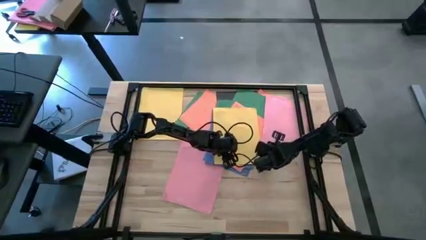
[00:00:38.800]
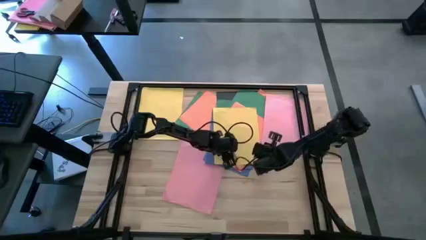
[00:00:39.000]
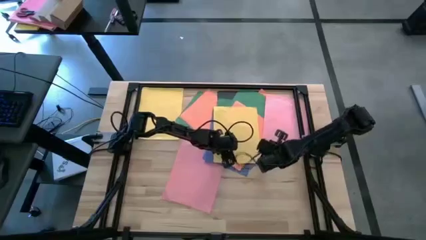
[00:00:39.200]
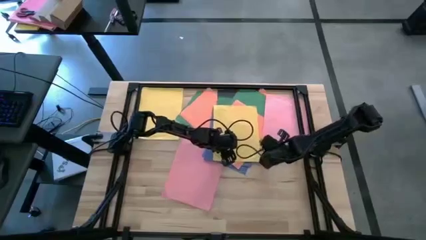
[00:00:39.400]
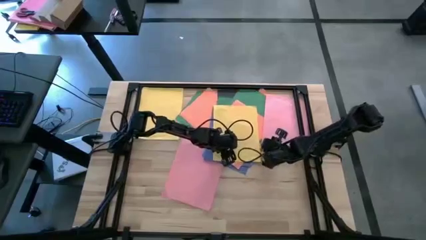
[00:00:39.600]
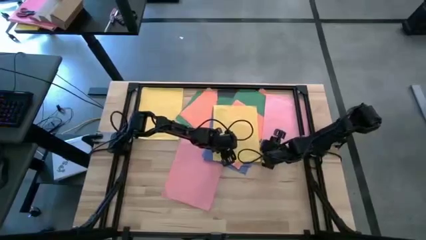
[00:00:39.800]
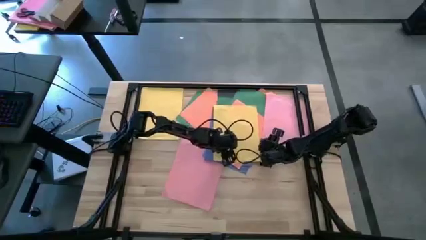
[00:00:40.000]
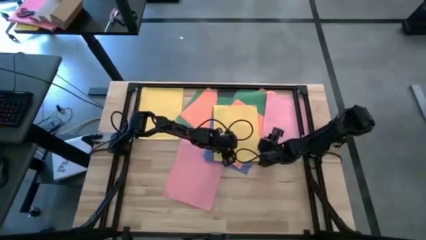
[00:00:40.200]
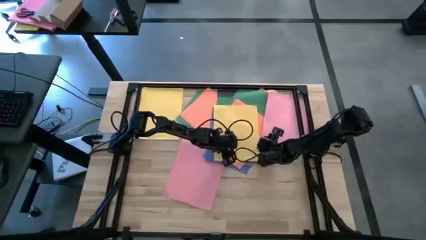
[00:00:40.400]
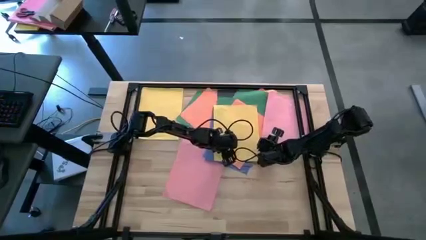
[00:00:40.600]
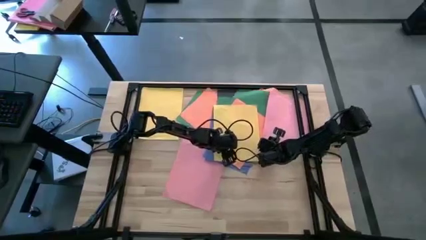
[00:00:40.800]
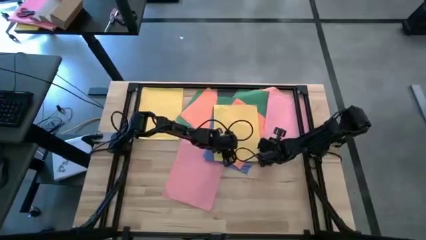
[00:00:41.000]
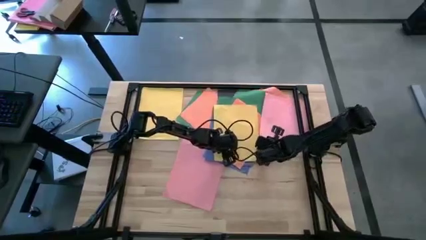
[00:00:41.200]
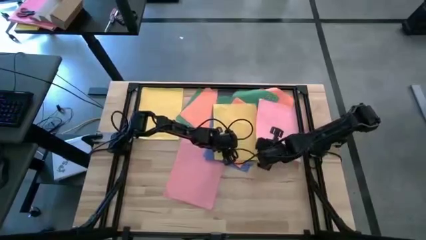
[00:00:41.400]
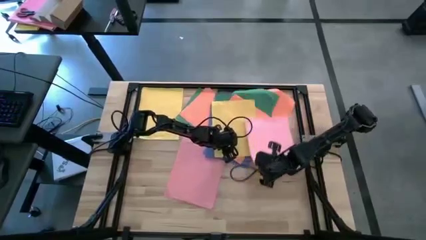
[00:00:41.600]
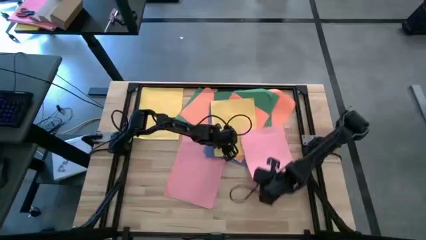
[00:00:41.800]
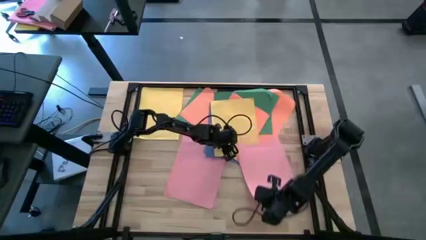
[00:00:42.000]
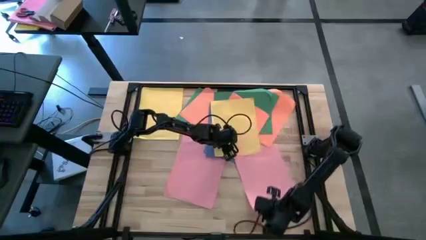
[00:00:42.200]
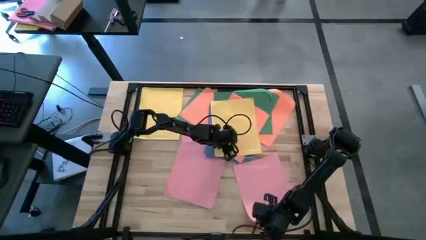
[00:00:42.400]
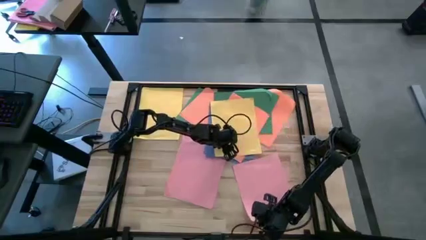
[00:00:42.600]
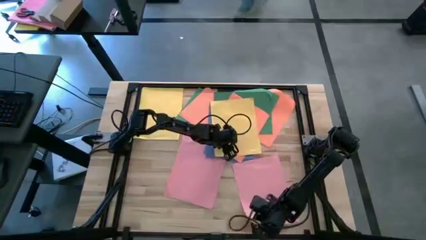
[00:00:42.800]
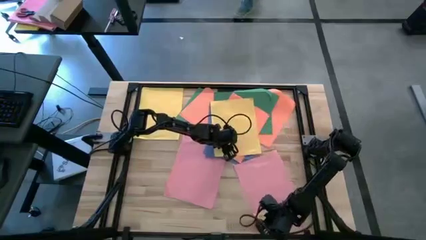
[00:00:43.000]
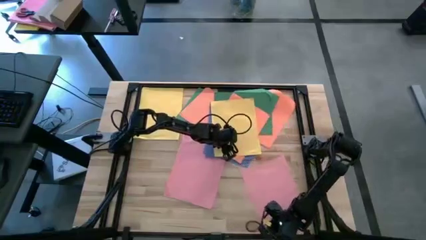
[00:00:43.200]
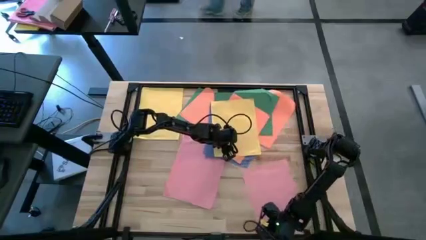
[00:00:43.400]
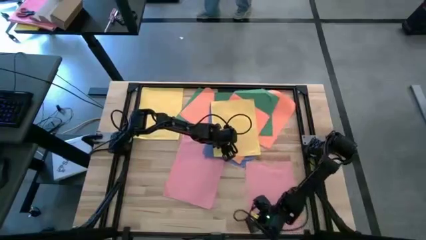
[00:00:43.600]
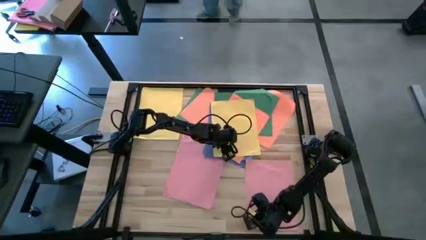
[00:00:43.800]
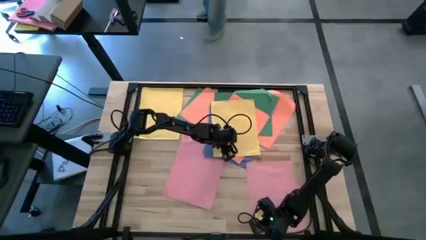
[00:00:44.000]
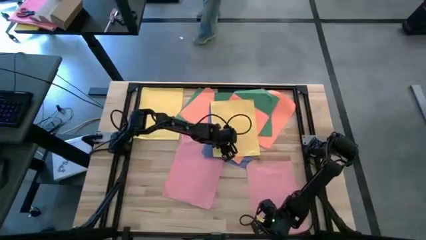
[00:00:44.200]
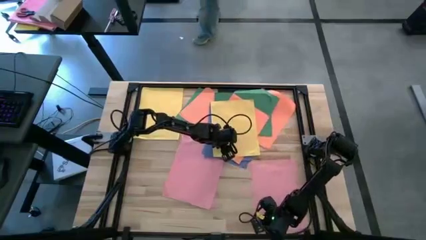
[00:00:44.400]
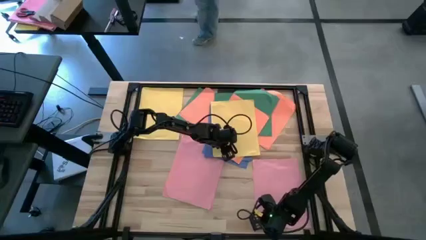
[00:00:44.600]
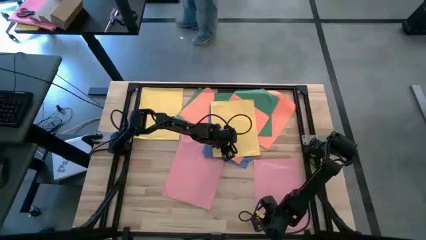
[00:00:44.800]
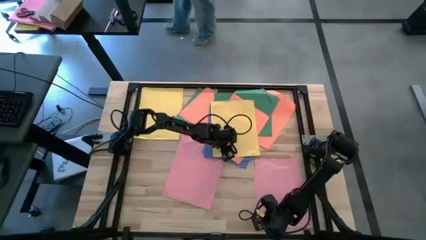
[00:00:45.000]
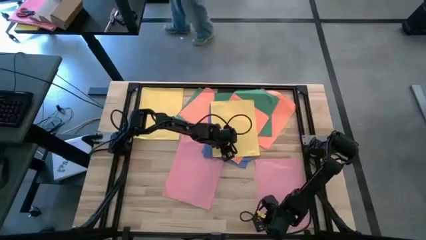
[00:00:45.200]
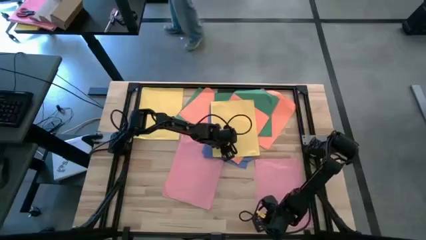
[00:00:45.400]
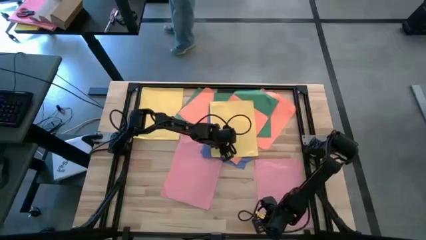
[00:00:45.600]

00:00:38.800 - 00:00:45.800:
Task: Organize paper
Move the pink paper to the bottom right of the table

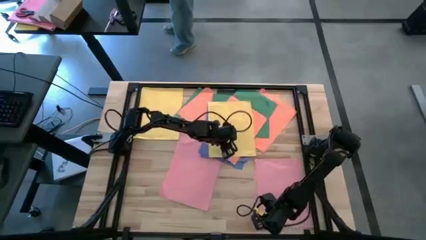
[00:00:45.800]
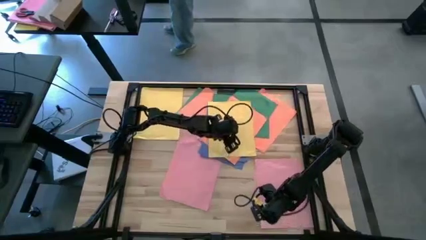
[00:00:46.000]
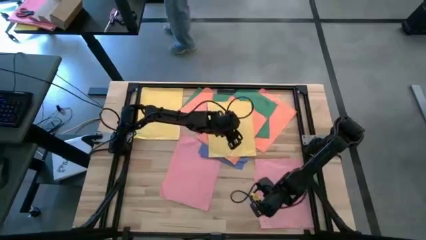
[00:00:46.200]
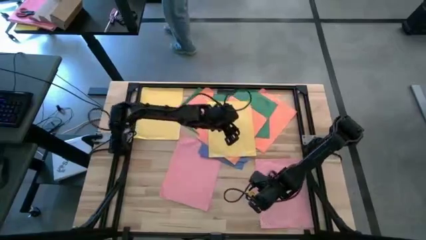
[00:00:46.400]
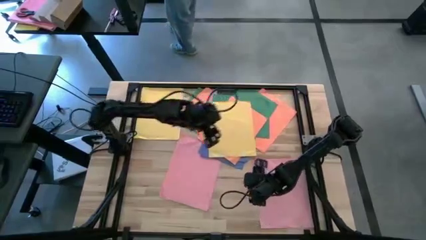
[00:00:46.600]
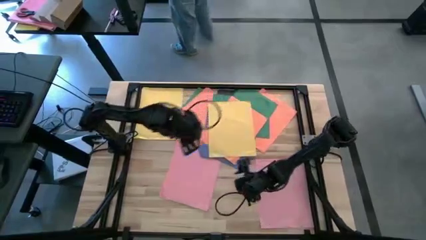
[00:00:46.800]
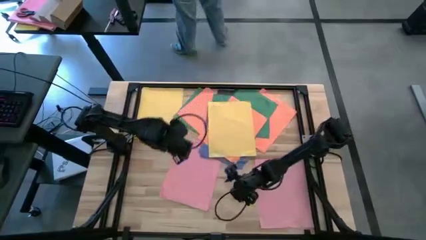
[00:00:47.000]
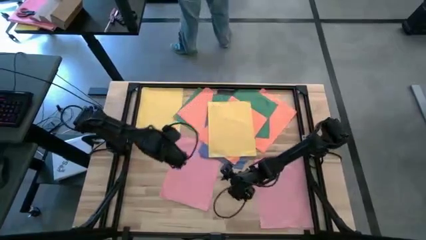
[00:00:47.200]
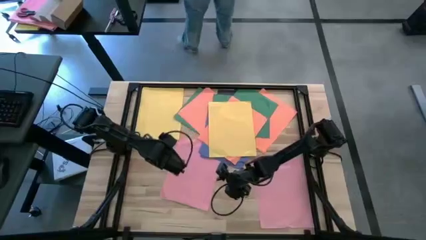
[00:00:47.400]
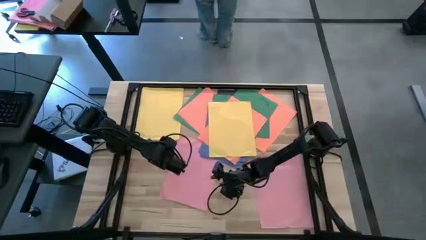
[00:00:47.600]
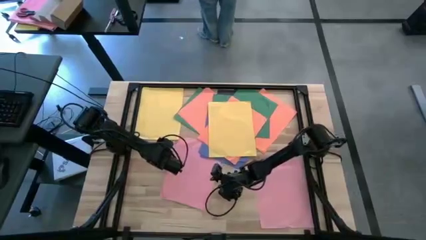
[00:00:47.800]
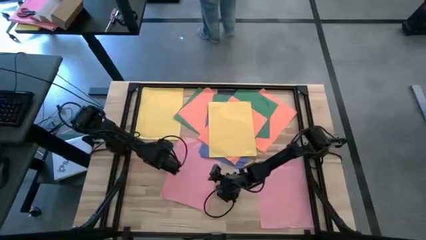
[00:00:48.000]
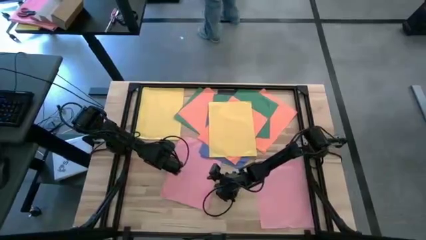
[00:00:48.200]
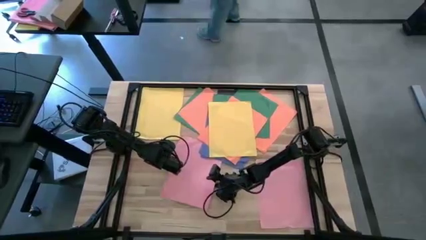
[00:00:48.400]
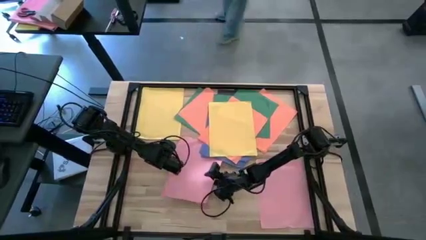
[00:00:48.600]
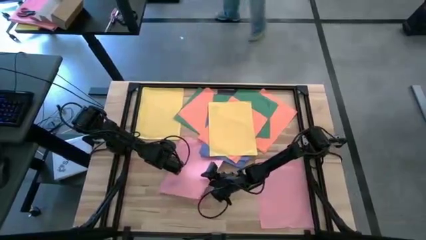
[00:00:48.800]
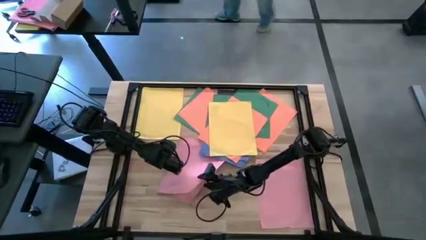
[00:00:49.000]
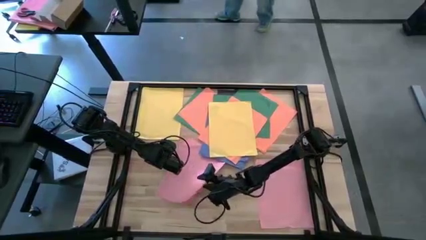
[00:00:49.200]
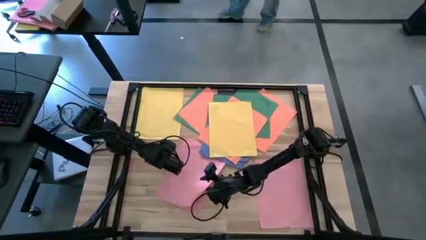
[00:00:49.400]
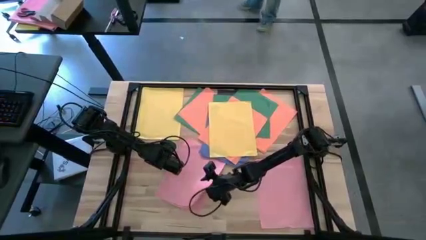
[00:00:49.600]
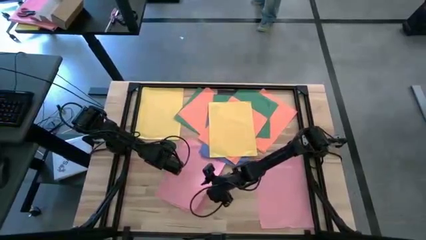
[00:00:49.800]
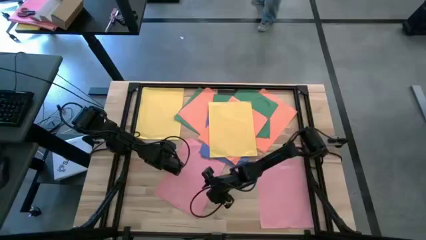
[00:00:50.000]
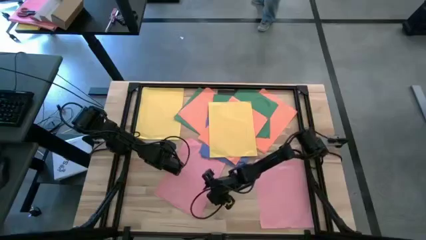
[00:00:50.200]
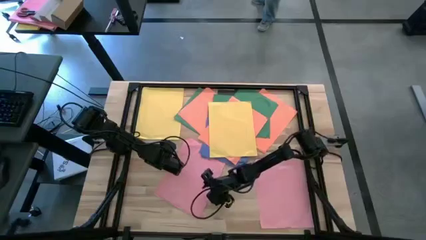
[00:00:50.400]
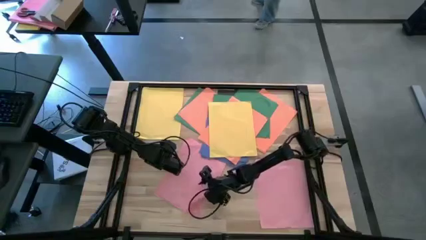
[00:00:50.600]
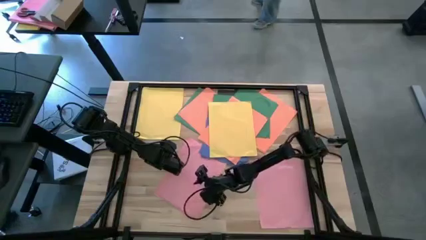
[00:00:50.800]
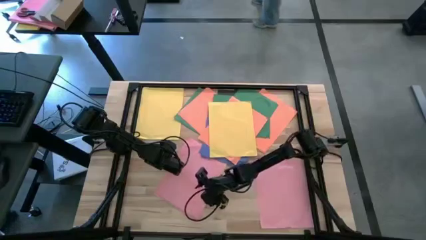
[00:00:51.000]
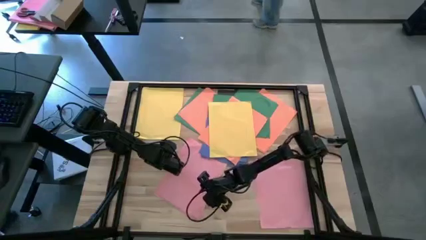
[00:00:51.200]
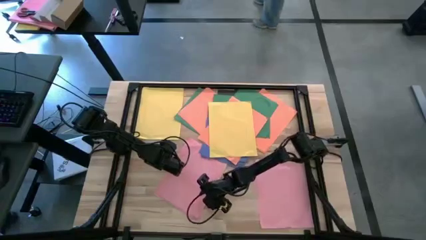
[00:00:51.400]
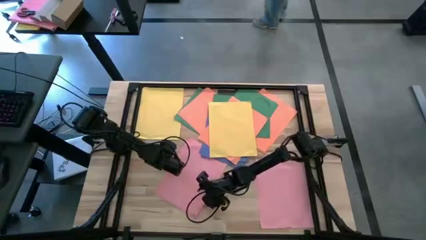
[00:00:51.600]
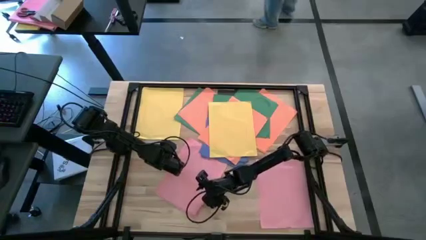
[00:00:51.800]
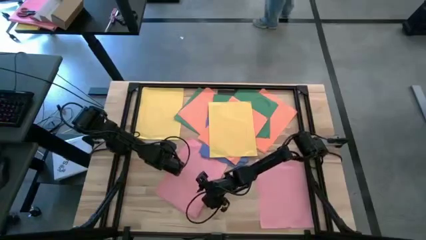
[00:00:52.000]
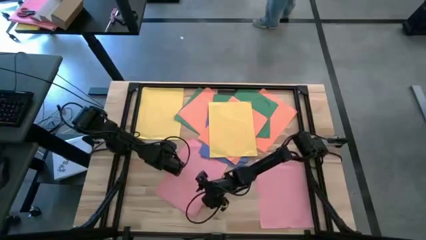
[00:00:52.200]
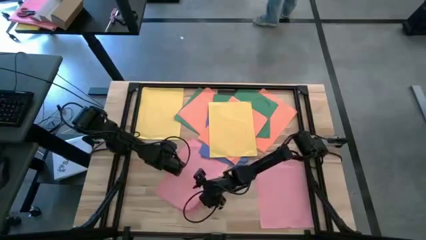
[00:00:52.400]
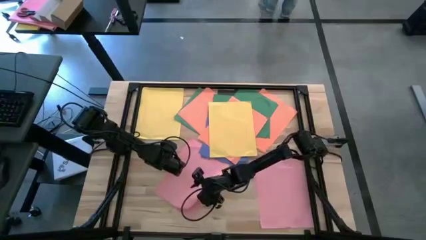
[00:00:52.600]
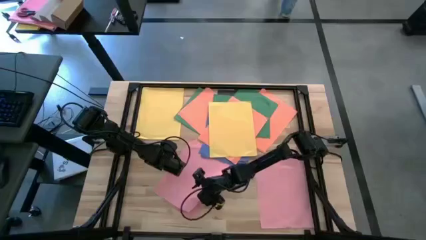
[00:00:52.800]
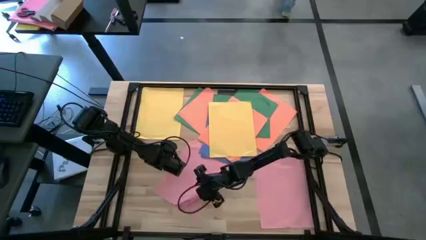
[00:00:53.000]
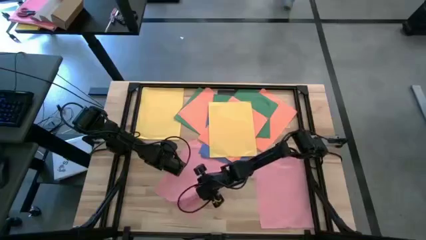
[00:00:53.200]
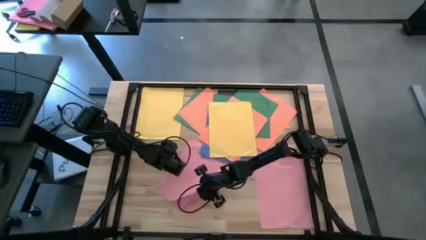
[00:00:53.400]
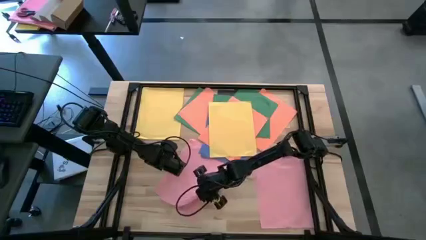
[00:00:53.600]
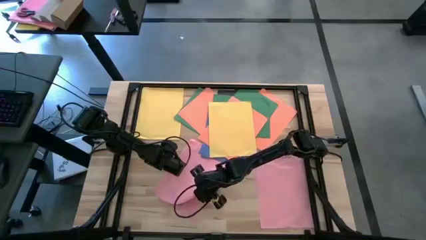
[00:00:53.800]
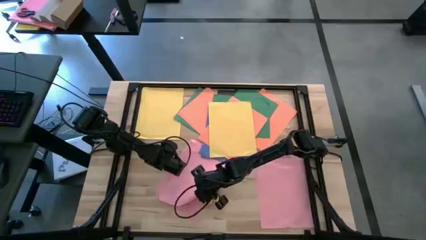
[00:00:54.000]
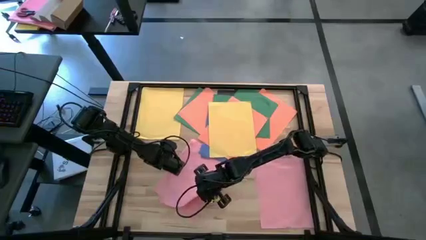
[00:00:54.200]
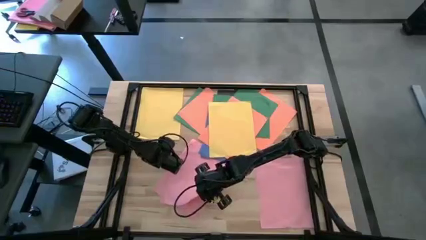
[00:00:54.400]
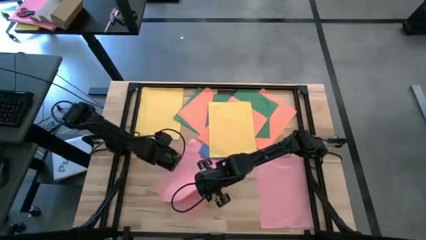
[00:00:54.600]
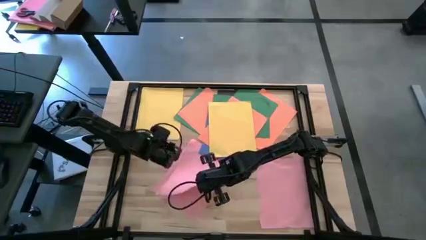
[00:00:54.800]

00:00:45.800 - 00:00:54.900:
Stack the pink paper on top of the other pink paper
